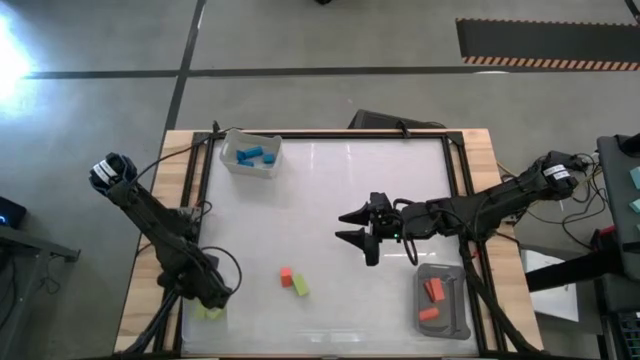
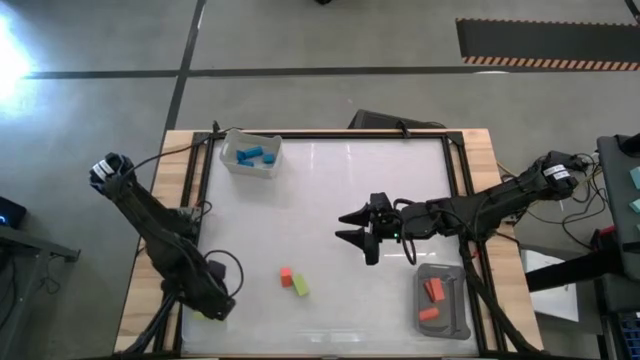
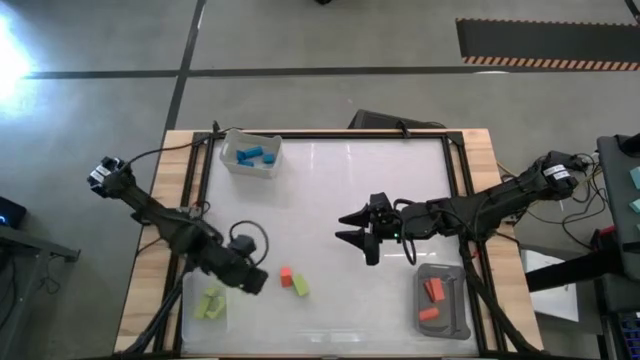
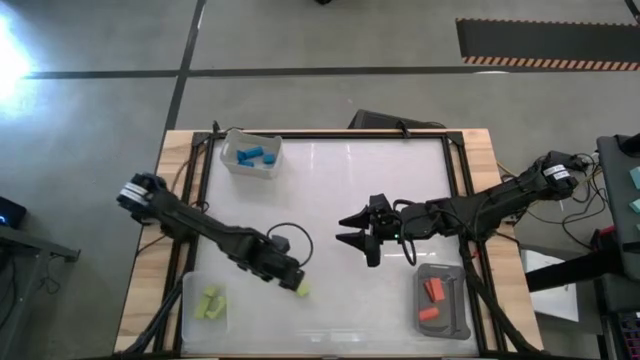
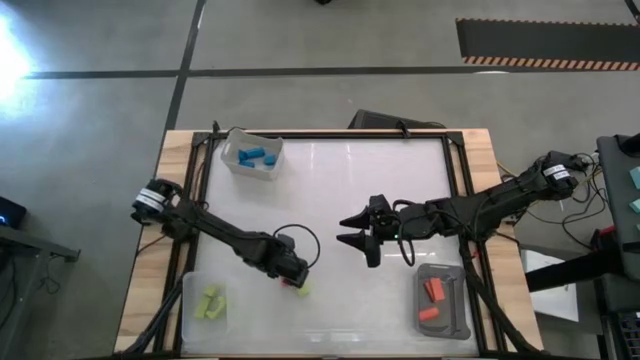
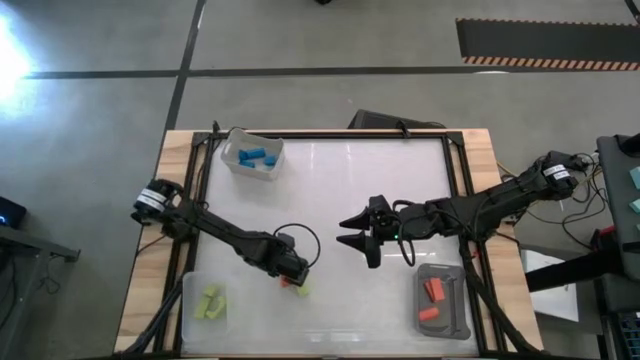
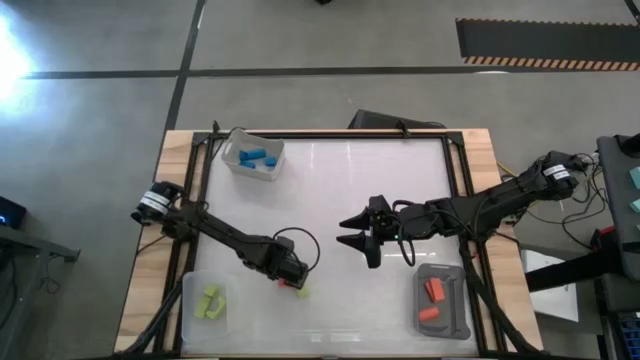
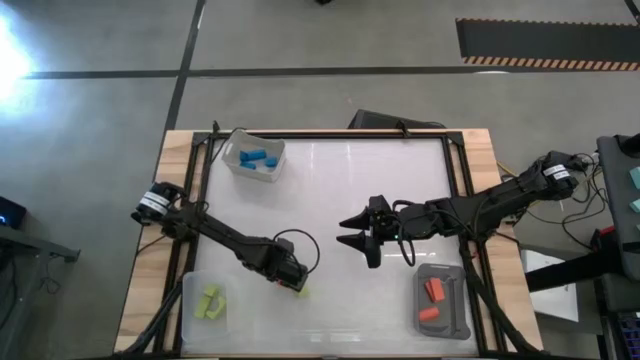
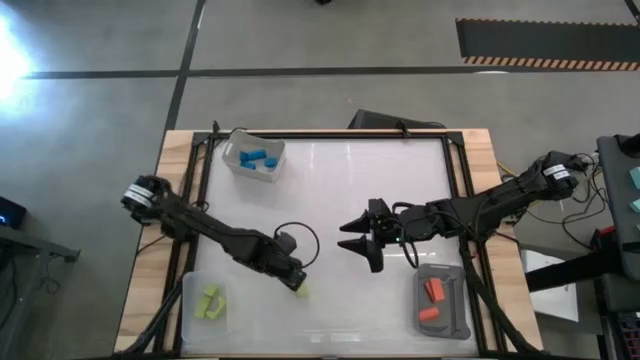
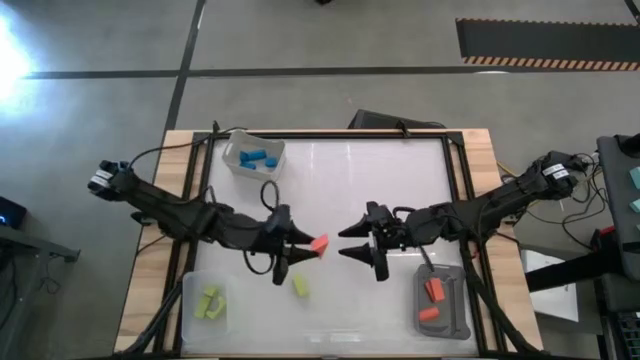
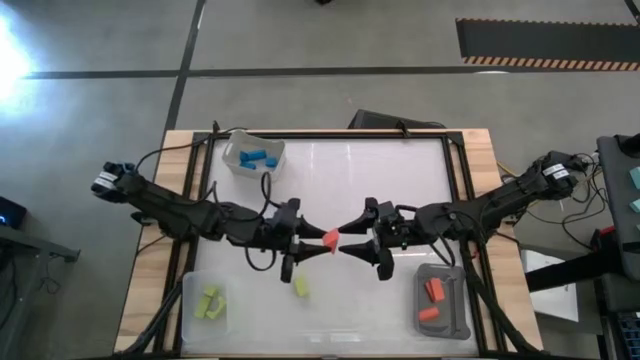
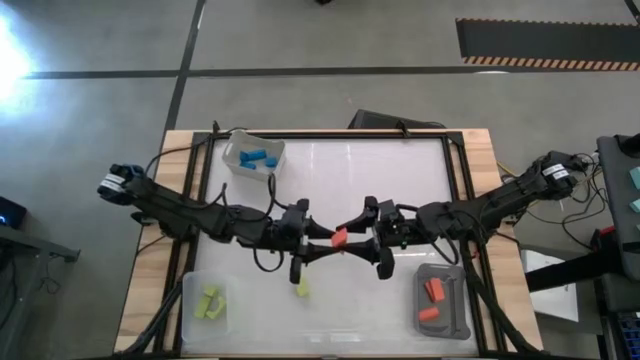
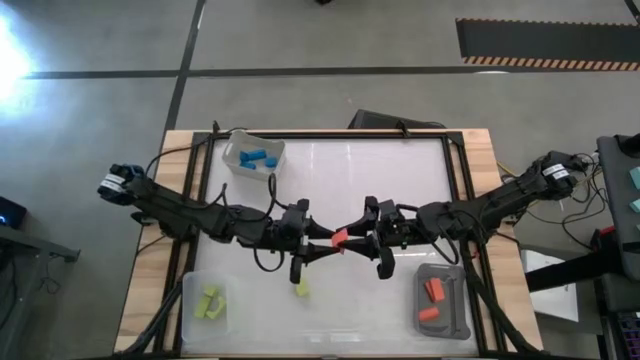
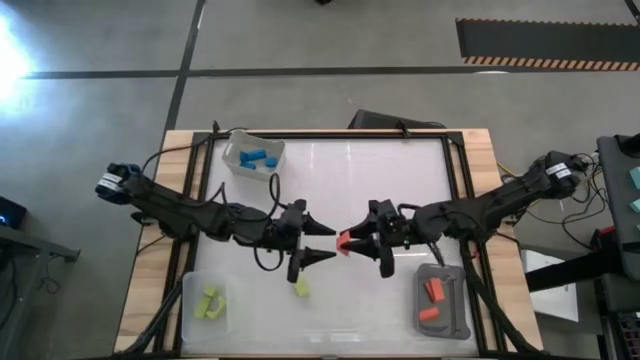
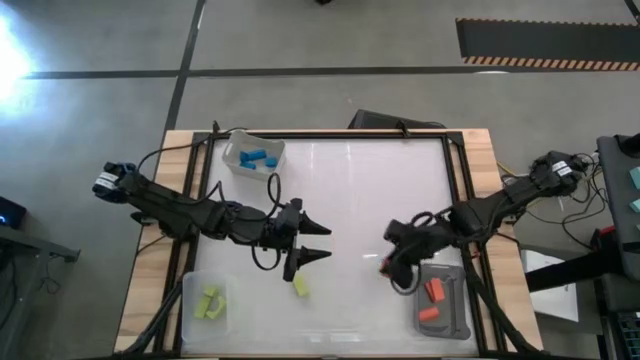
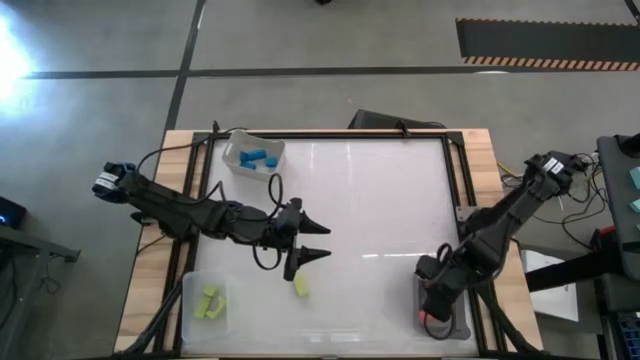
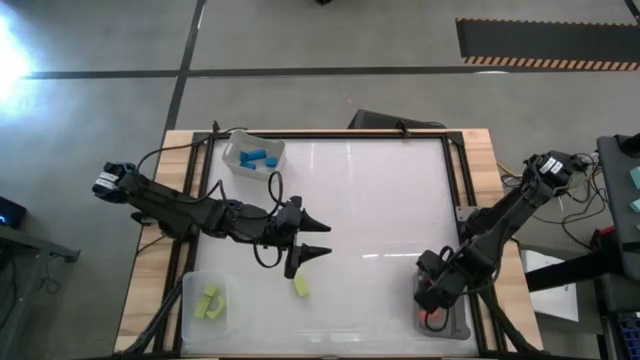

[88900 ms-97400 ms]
Task: Sort & place blocks by color
Put the orange block into the black bin

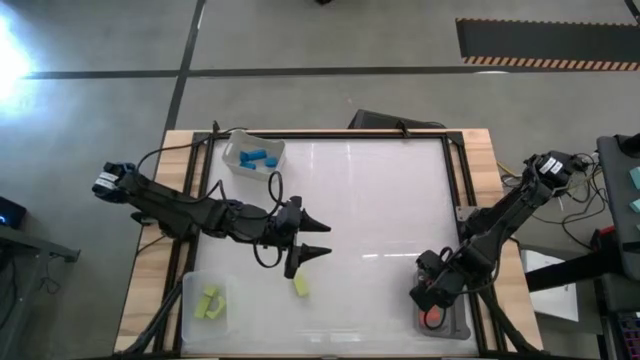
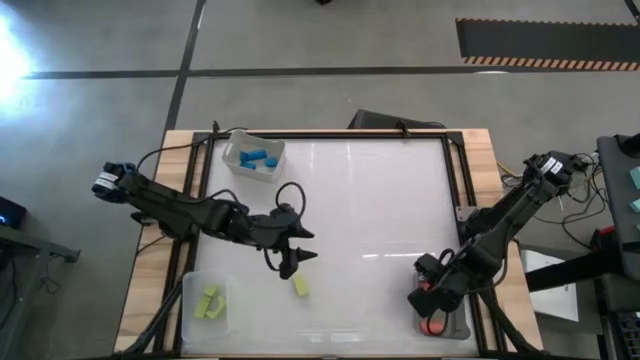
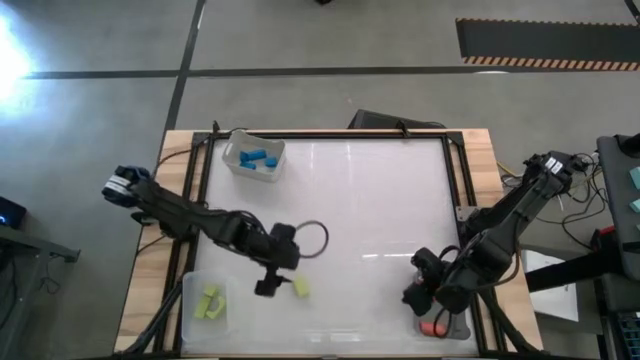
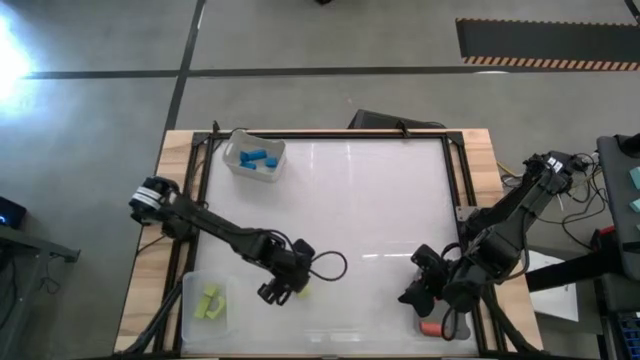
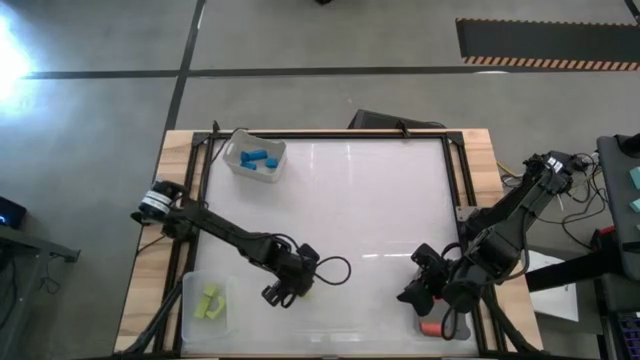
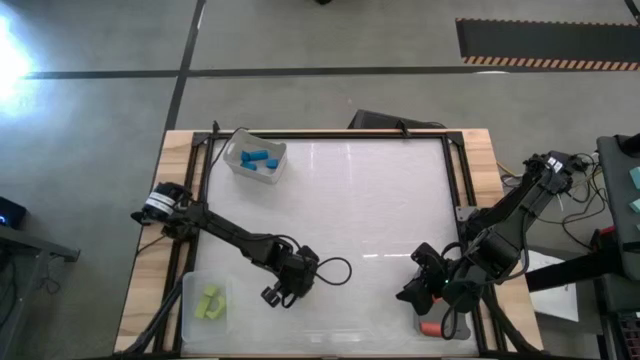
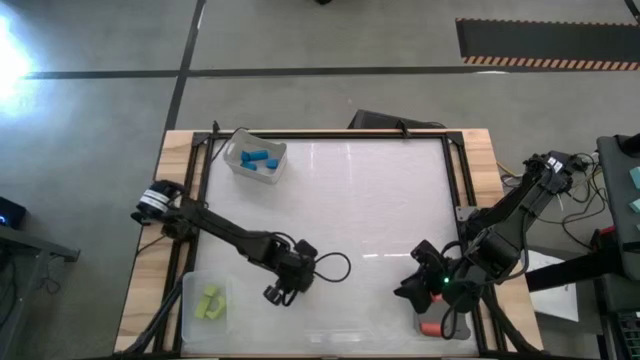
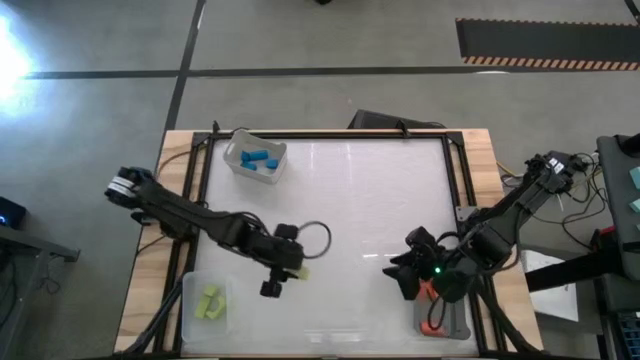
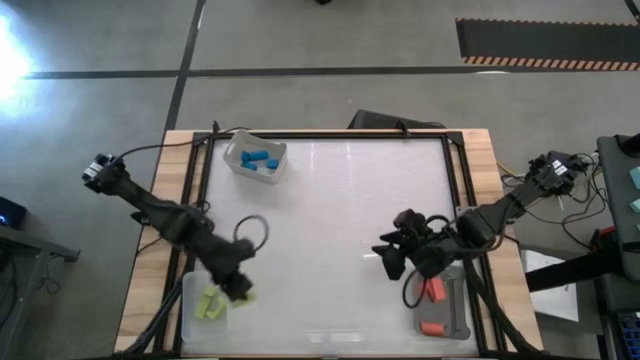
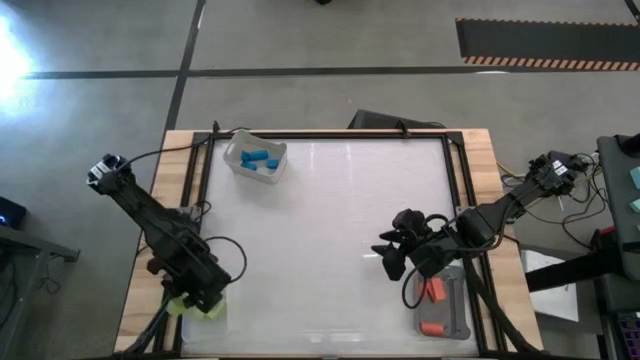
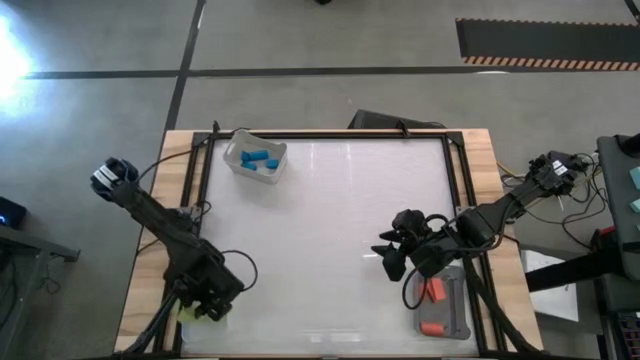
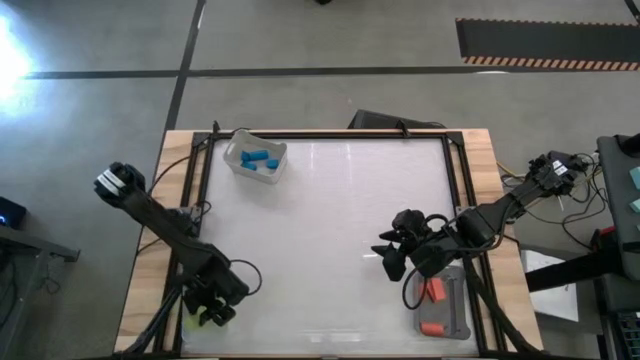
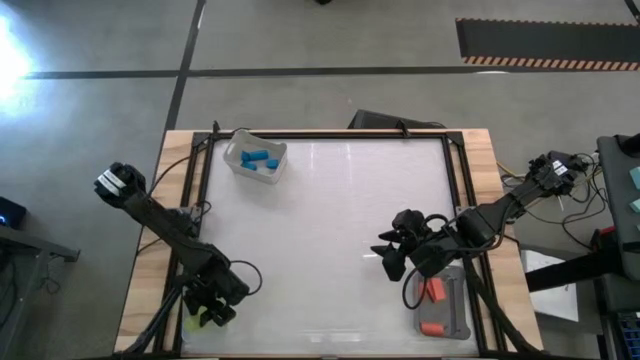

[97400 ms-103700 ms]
Put the green block into the transparent bin

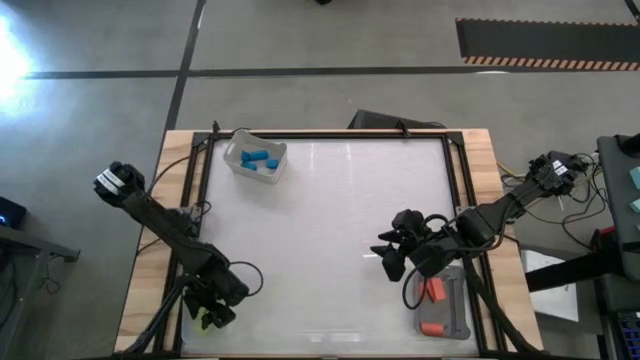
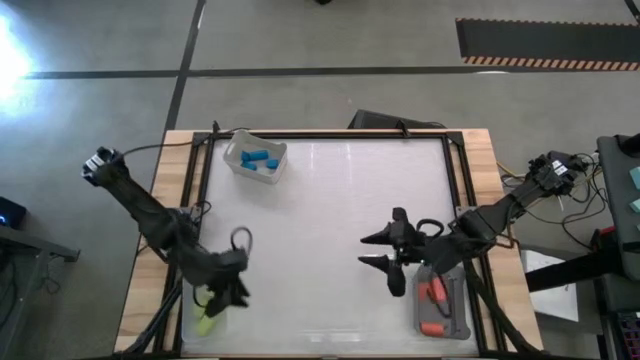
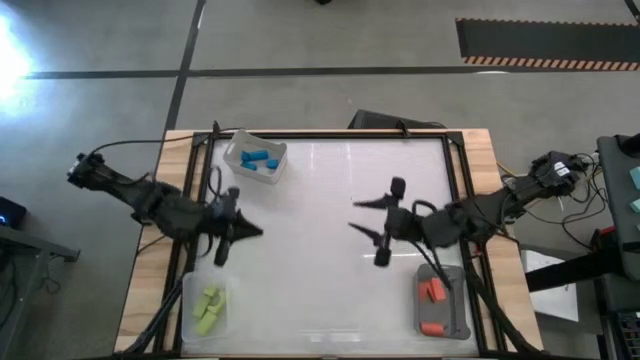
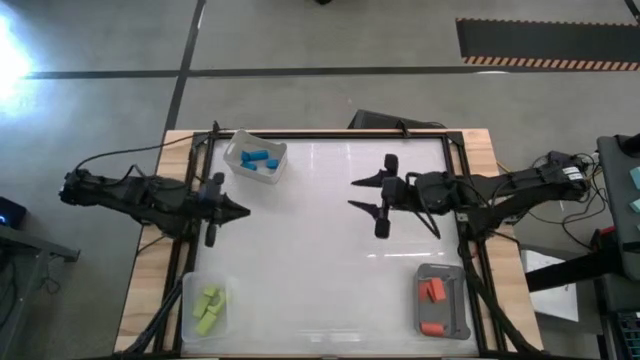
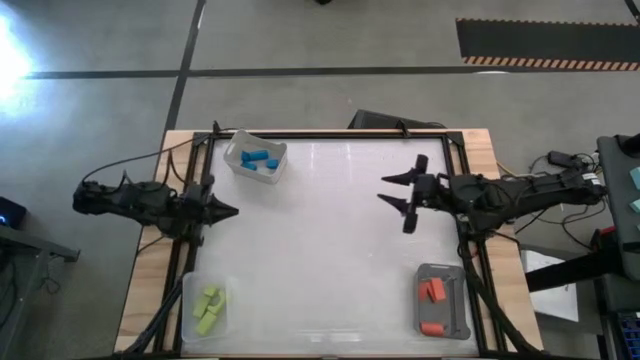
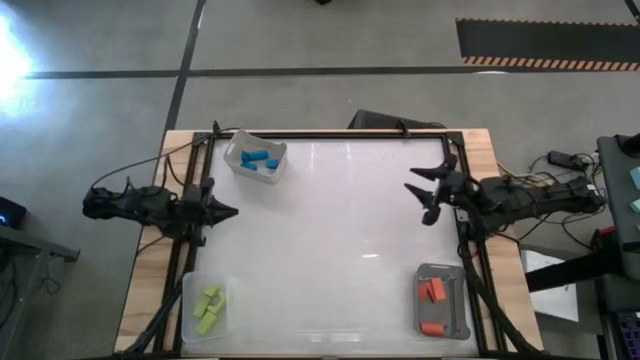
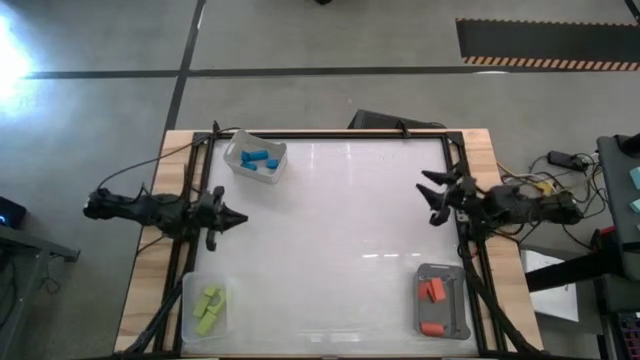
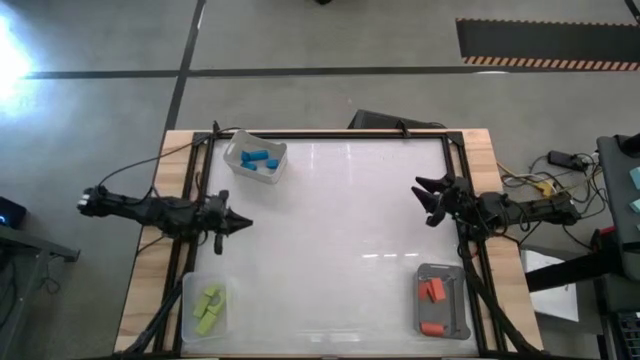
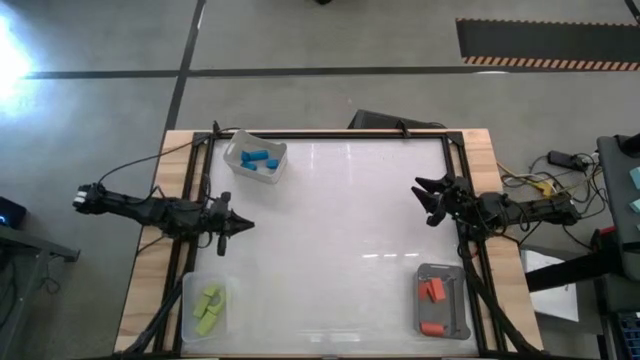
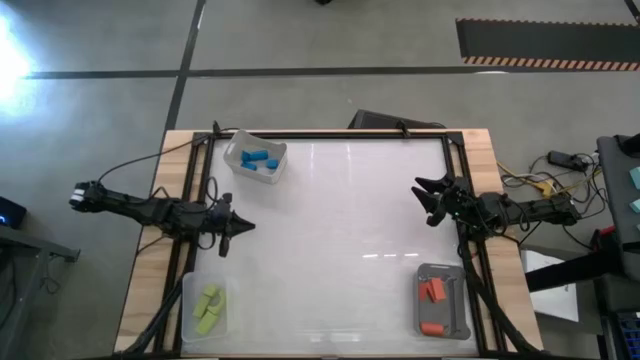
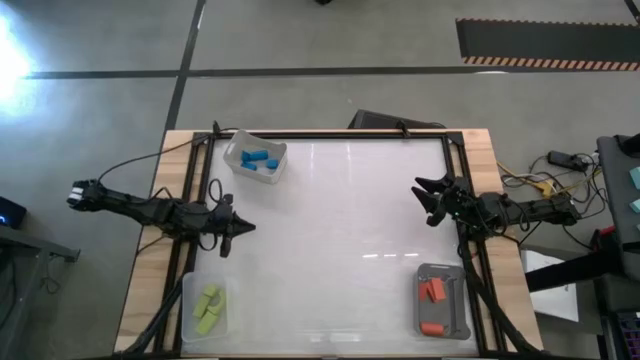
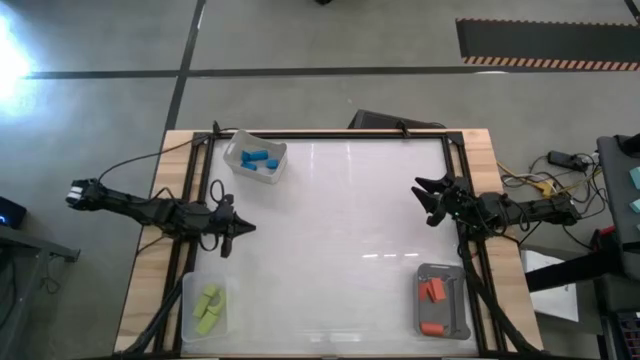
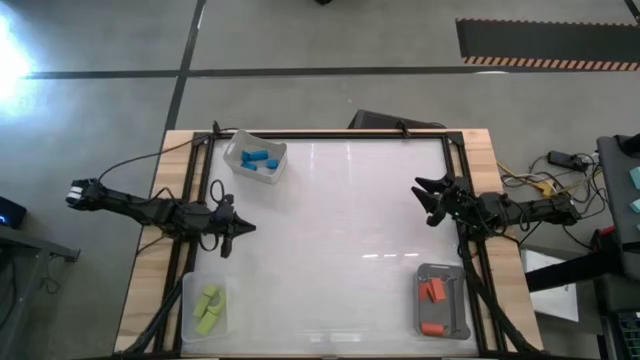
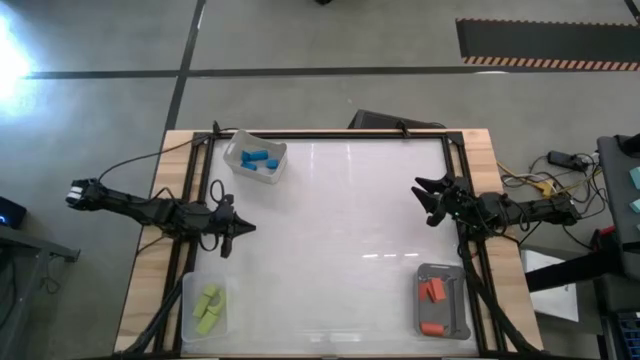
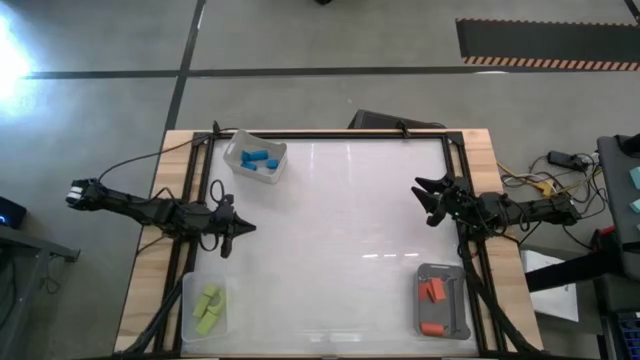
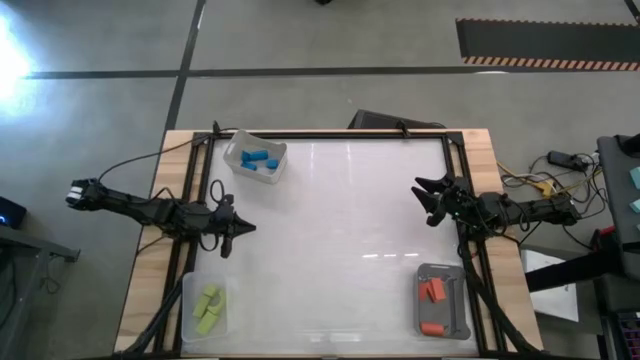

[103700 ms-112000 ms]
Return to home position
